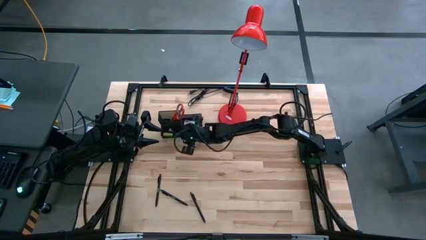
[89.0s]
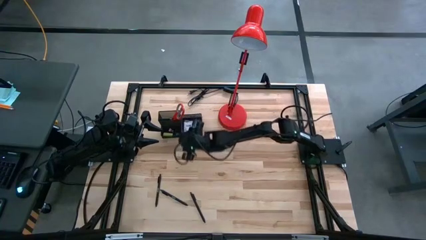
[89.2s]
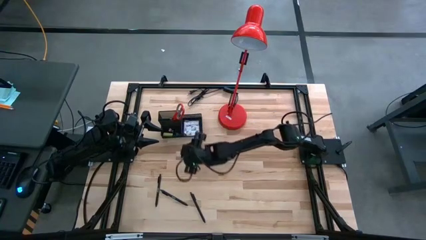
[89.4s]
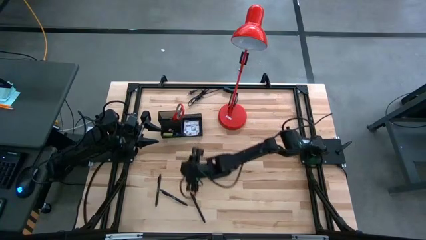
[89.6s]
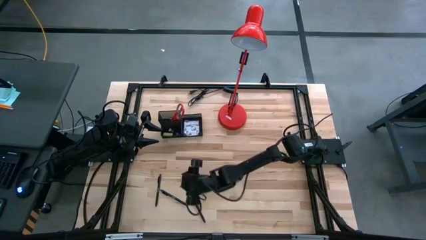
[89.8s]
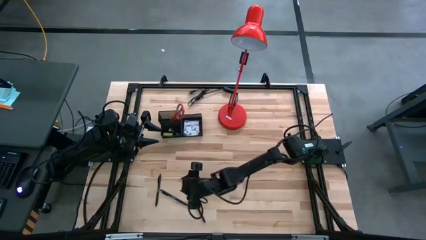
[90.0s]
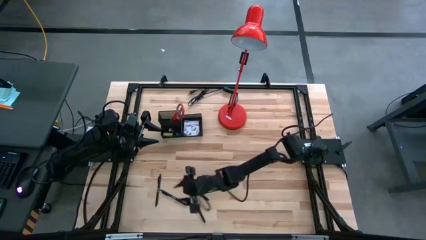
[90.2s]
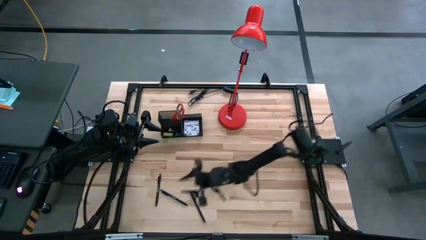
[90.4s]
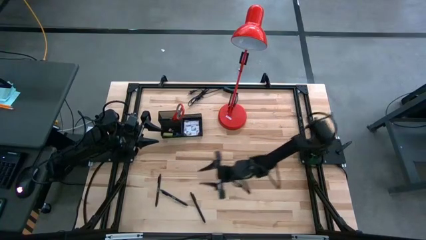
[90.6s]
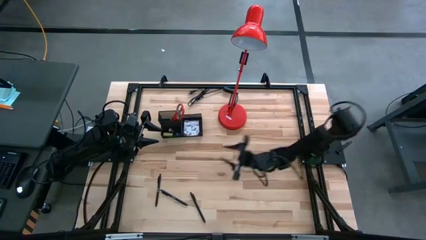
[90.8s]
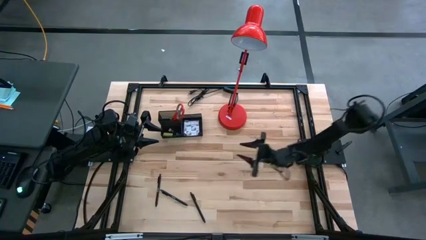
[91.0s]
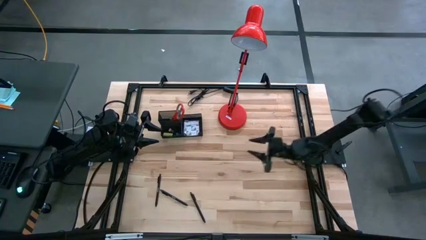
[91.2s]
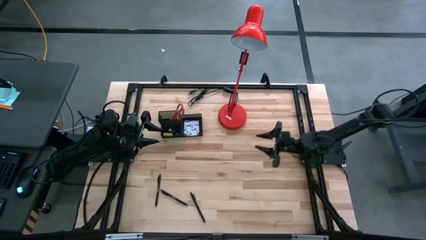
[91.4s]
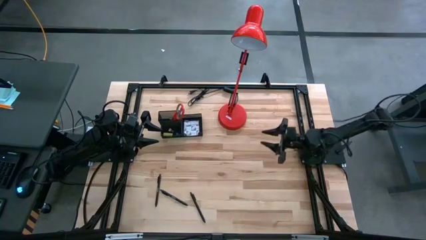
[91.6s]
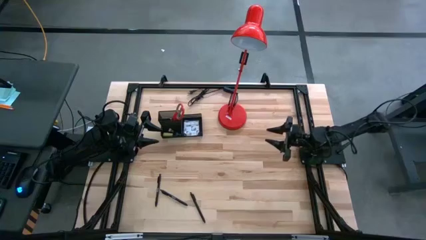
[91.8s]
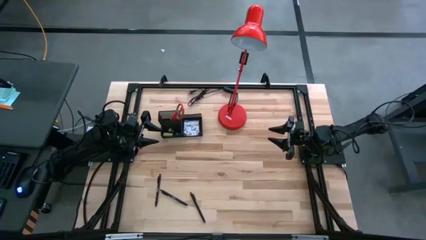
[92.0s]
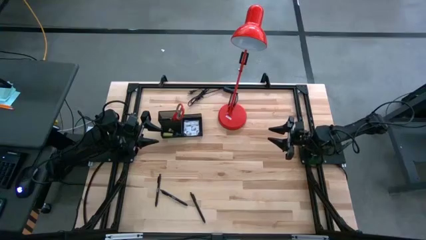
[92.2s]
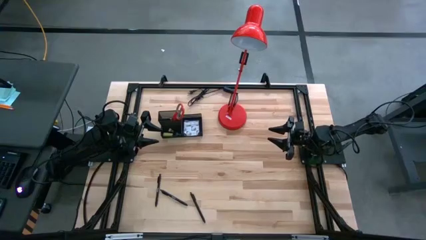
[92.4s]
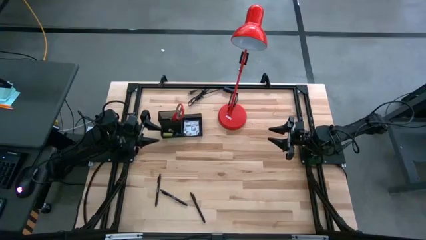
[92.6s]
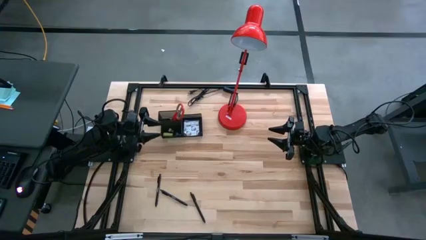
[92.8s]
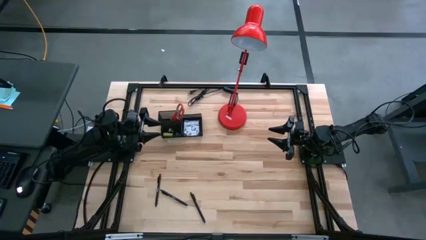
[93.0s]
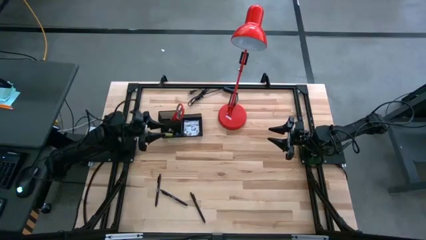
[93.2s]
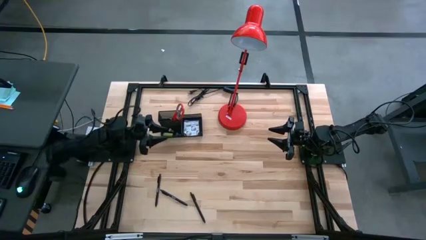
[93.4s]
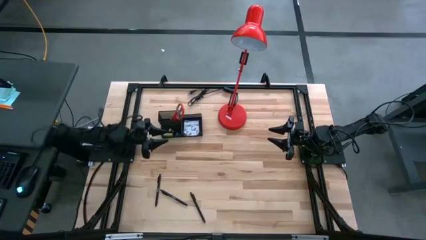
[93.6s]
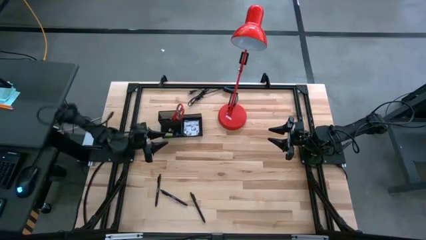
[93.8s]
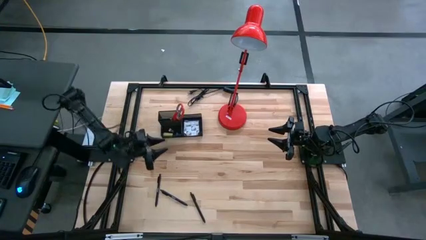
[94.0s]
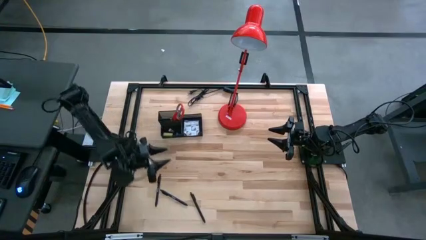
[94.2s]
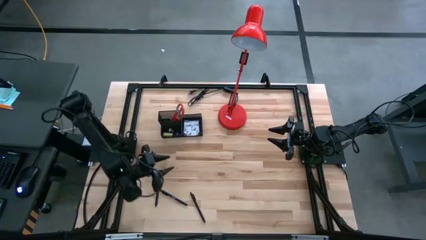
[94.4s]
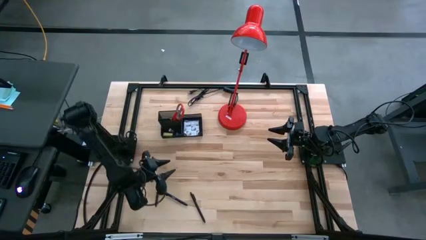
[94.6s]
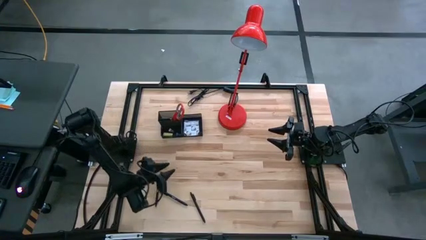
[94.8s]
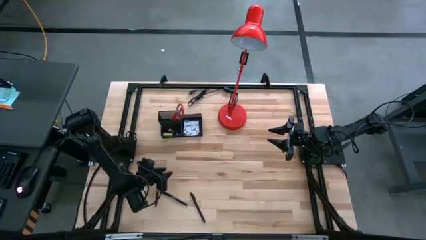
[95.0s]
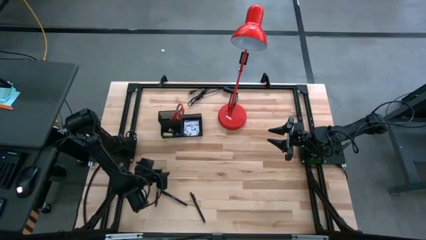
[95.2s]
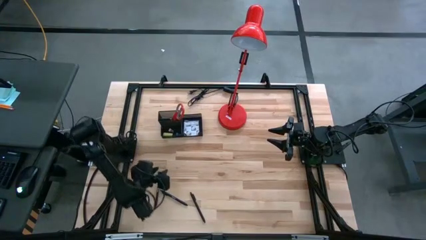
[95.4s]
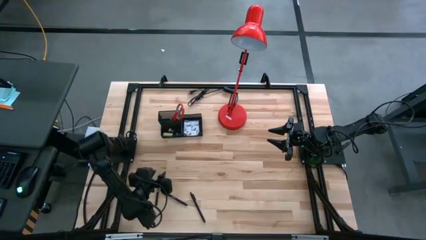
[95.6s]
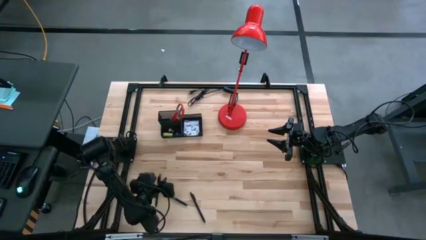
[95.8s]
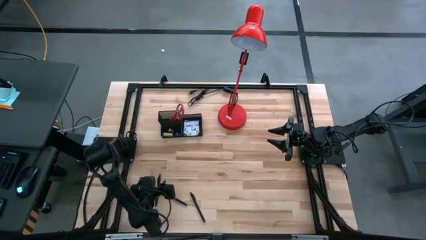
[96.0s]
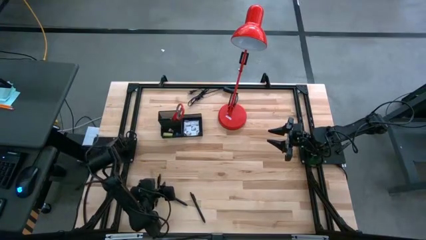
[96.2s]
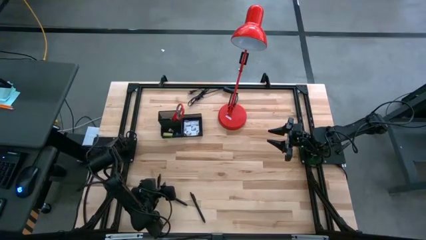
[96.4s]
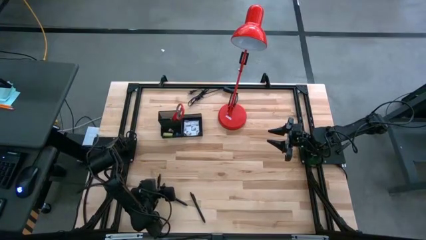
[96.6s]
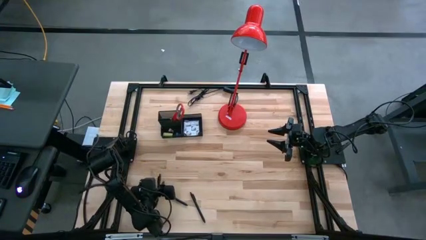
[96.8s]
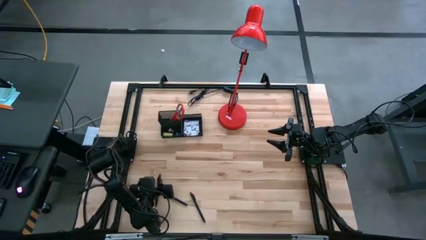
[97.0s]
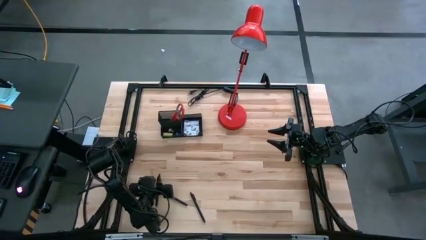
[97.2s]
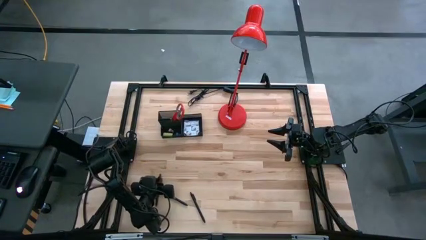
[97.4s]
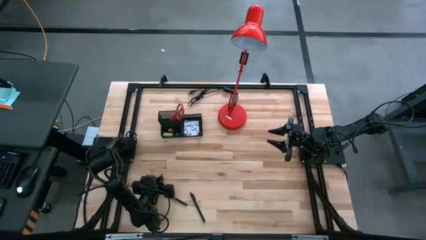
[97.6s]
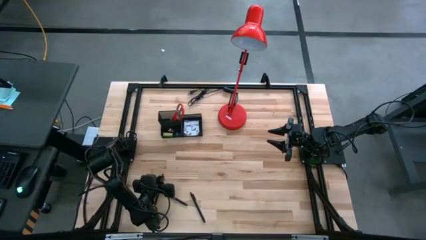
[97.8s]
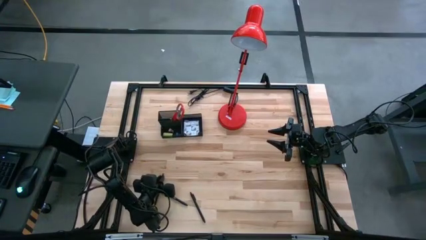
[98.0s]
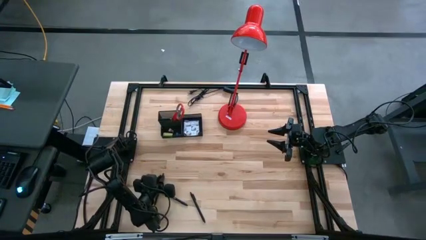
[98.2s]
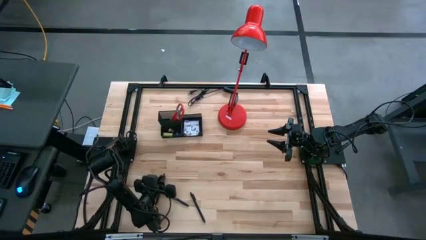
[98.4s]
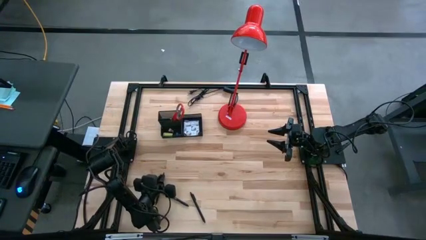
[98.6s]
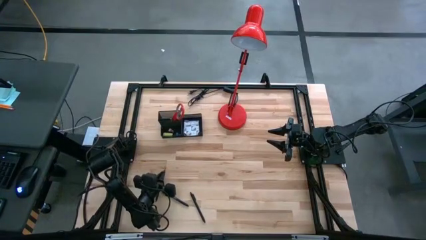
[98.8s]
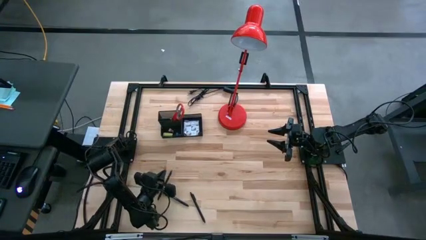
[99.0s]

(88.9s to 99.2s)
Task: Pick and place office supplies into organizer
Put the black pen into the black desk organizer

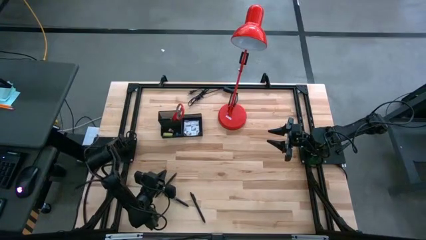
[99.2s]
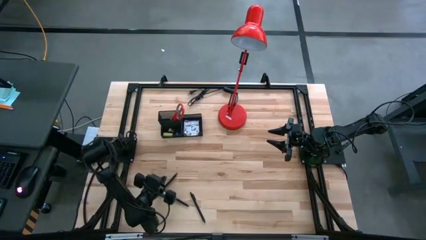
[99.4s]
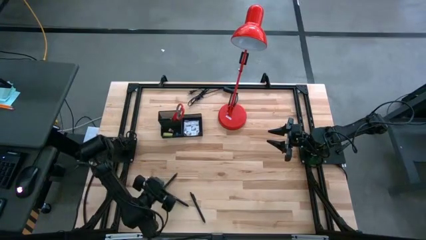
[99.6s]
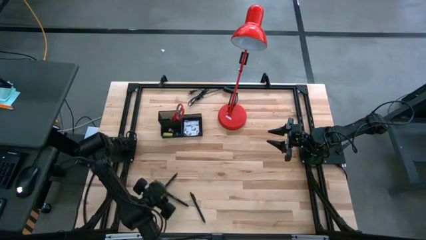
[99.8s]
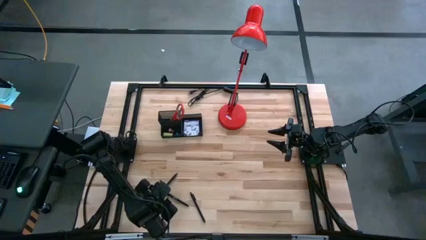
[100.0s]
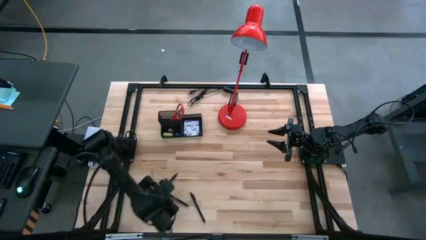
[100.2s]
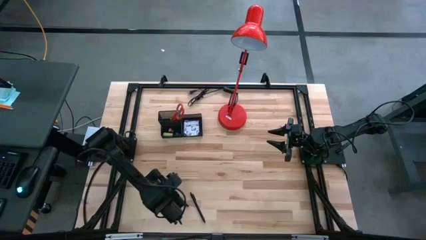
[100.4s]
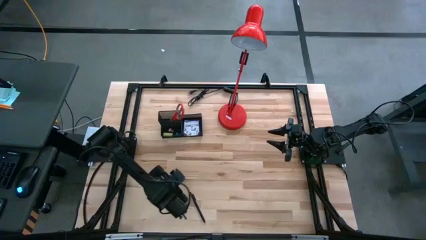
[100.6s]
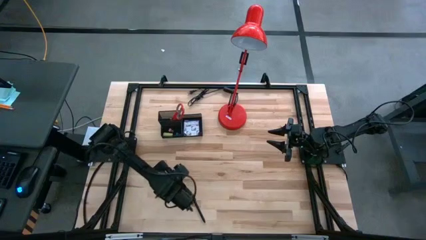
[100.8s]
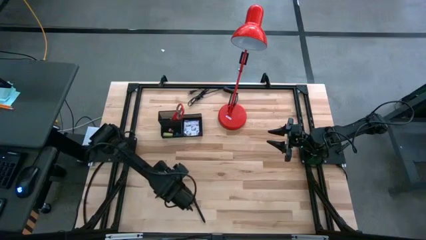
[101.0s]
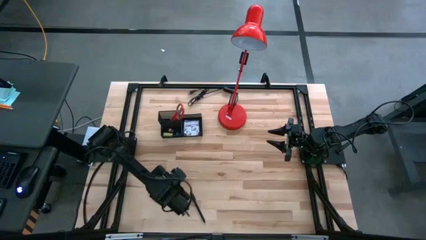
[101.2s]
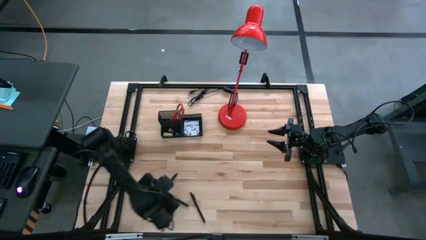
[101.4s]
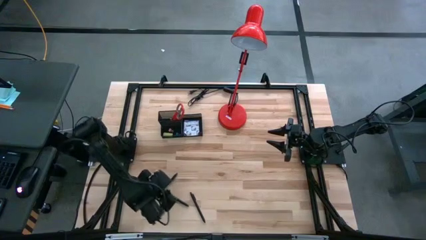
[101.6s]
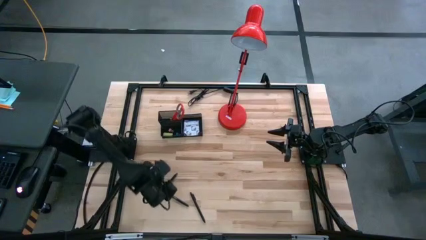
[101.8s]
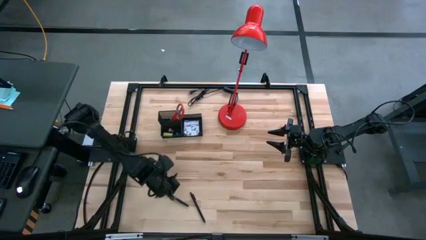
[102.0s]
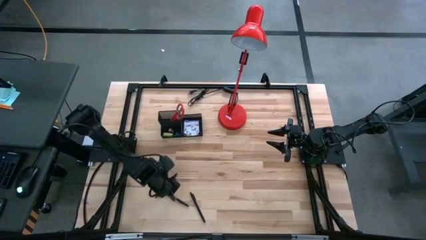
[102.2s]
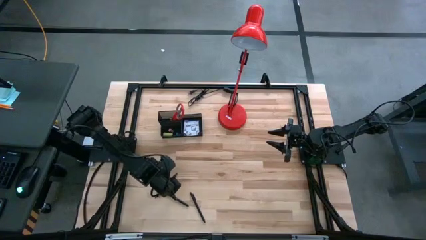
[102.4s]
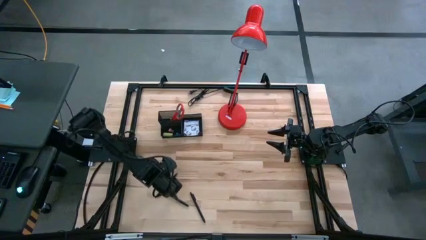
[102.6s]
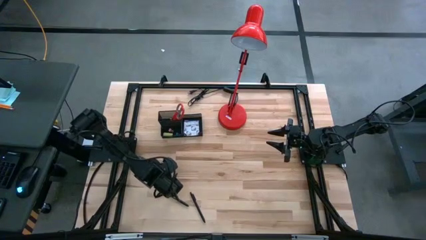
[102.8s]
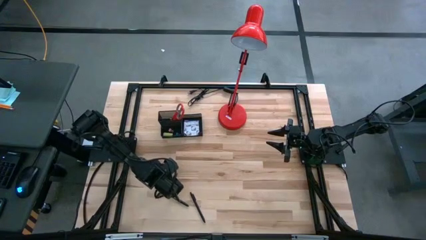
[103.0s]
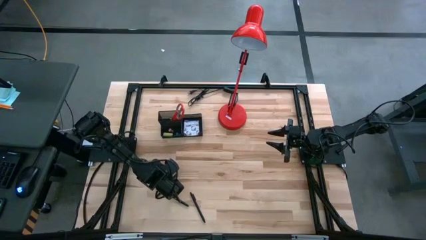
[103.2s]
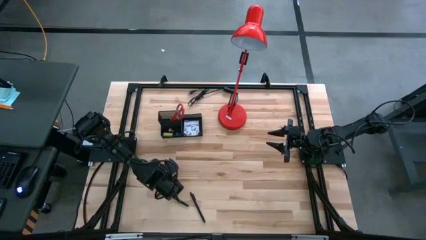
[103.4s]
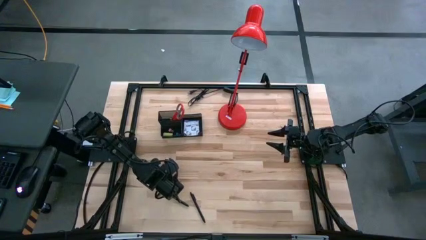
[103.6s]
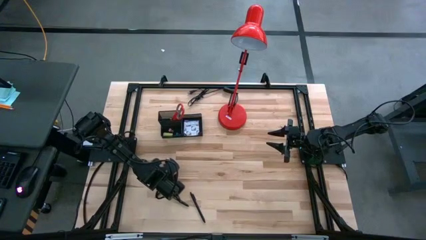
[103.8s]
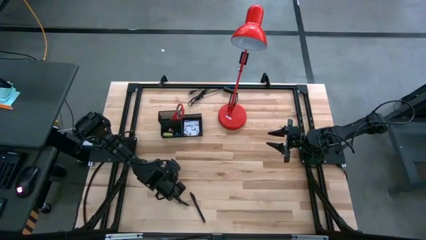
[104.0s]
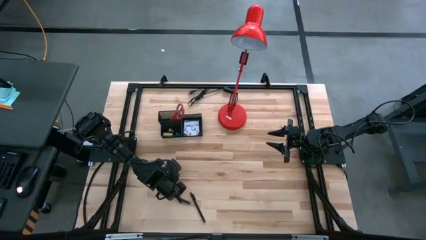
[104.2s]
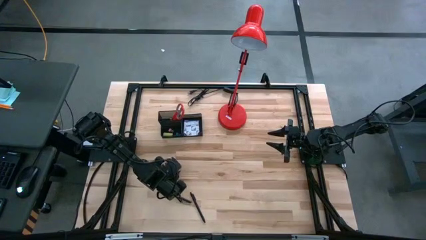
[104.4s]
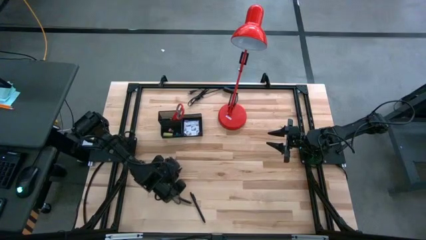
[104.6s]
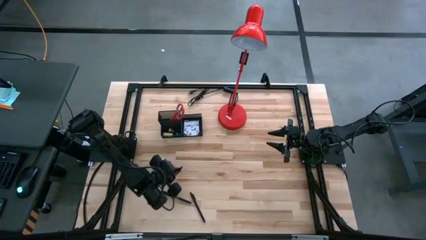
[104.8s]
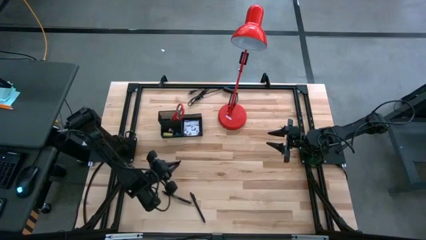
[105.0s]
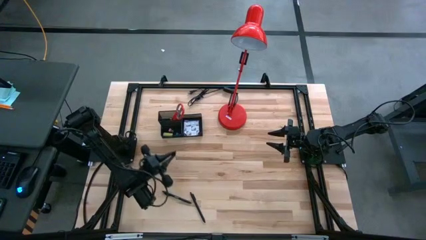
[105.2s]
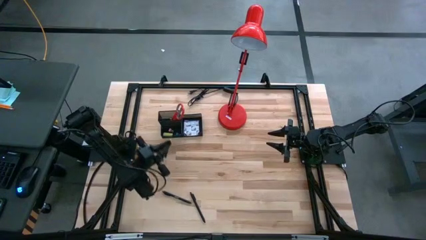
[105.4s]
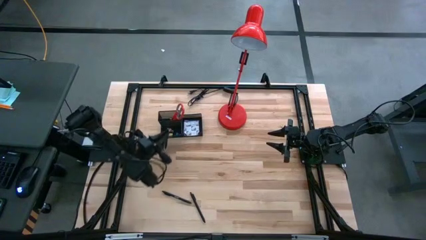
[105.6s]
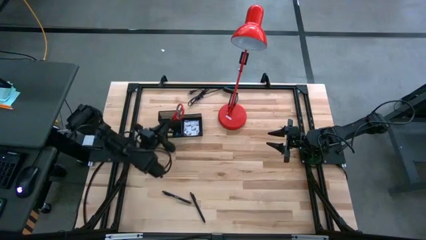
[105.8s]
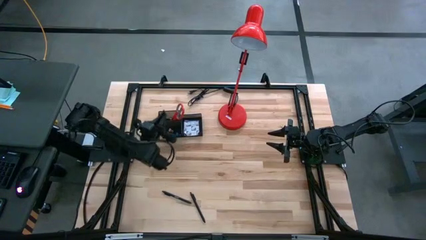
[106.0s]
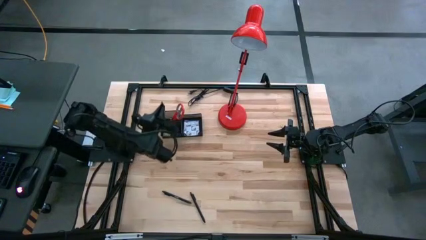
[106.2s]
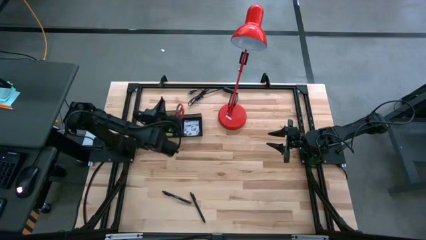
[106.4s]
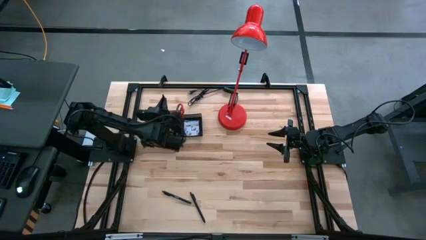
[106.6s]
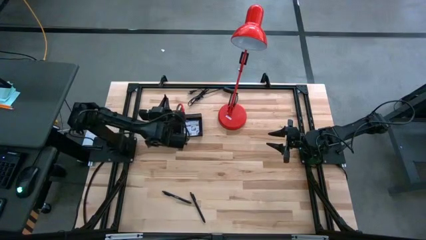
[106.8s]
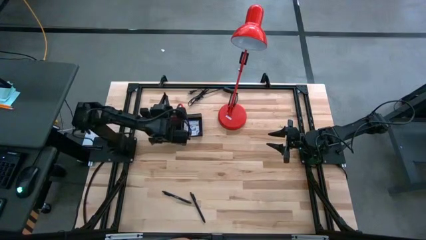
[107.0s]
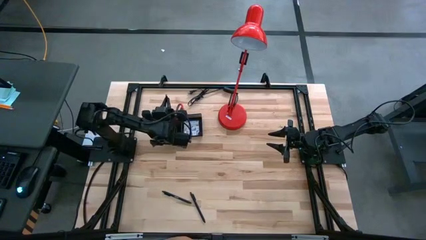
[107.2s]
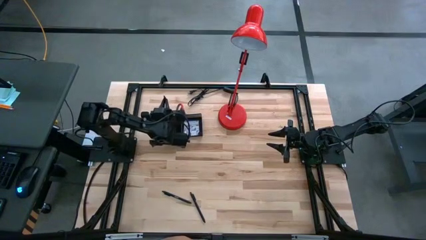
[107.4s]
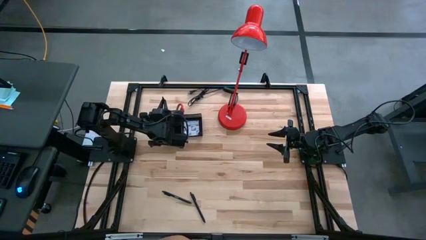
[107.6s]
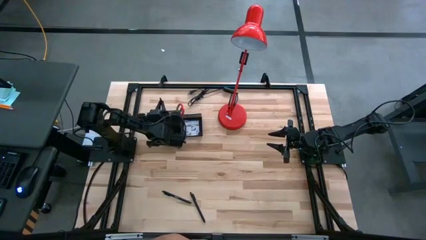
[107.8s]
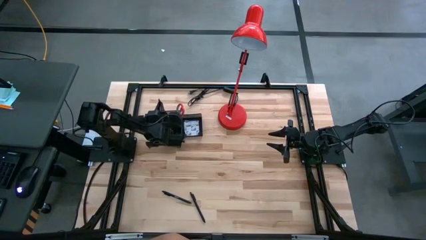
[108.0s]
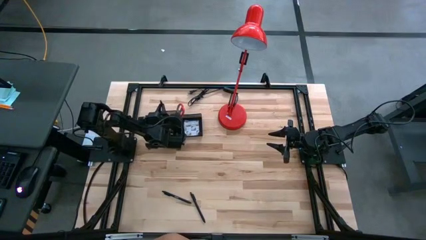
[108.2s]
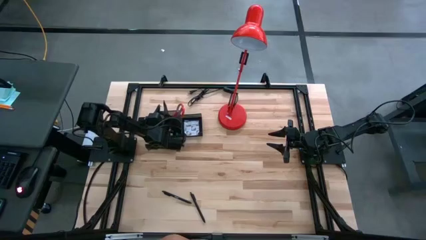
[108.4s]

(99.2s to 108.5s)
Put the black pen into the black desk organizer
